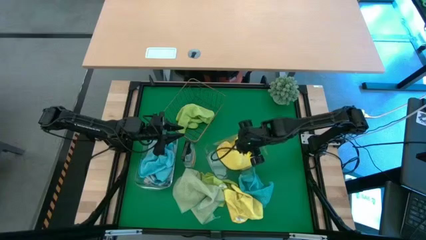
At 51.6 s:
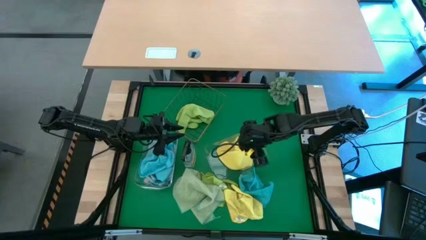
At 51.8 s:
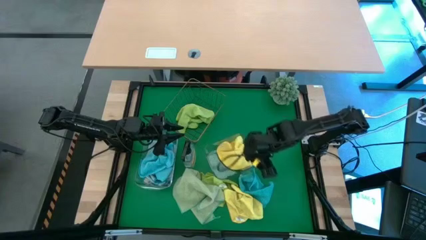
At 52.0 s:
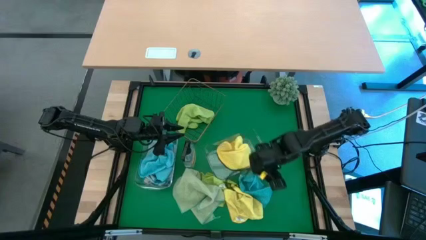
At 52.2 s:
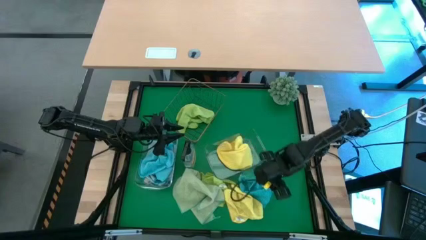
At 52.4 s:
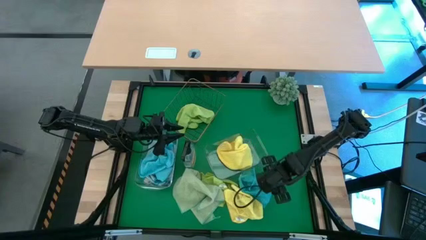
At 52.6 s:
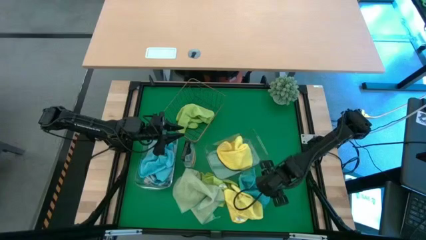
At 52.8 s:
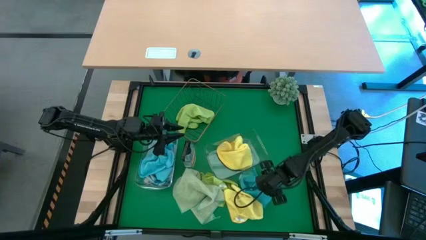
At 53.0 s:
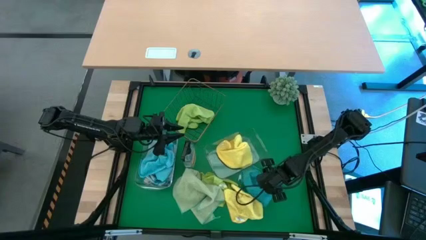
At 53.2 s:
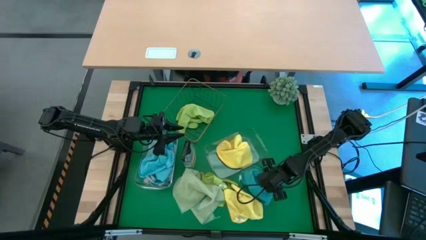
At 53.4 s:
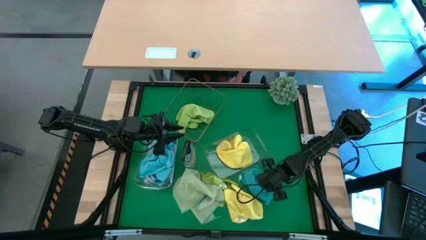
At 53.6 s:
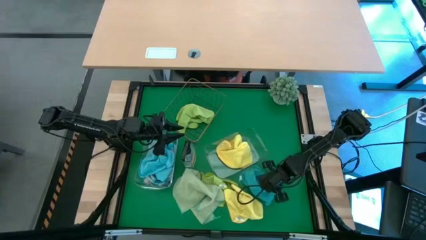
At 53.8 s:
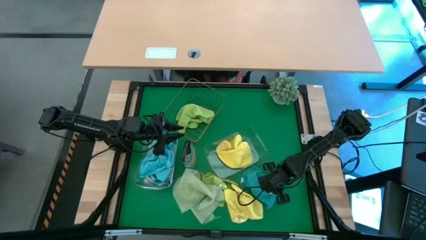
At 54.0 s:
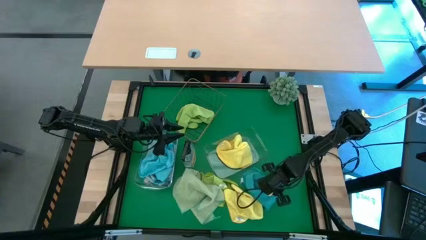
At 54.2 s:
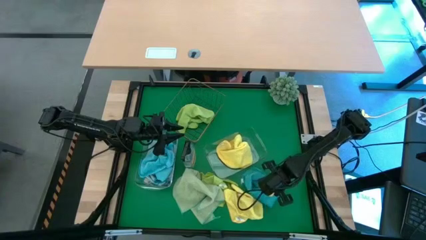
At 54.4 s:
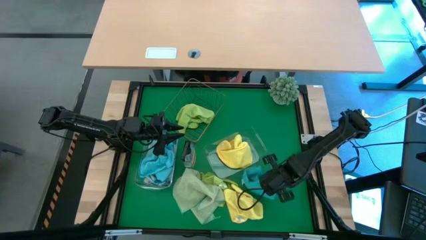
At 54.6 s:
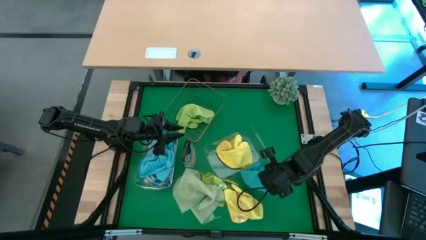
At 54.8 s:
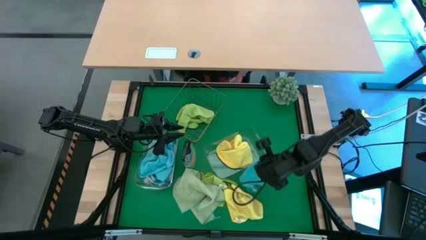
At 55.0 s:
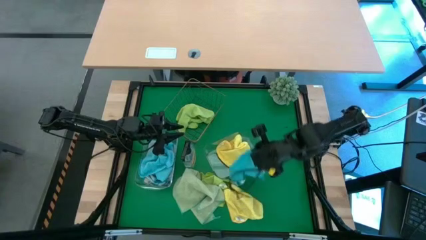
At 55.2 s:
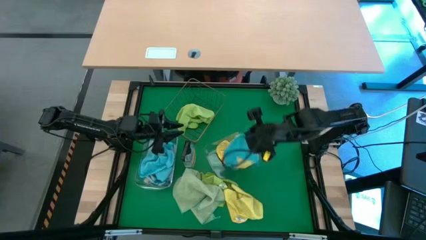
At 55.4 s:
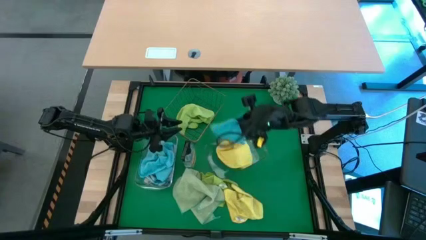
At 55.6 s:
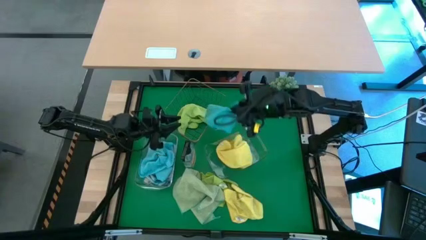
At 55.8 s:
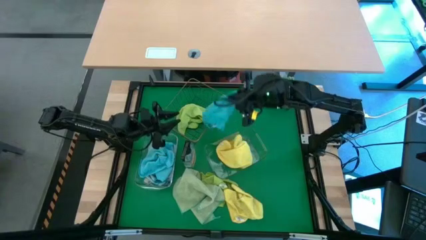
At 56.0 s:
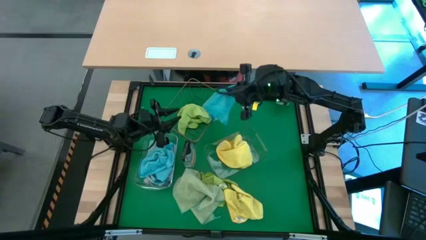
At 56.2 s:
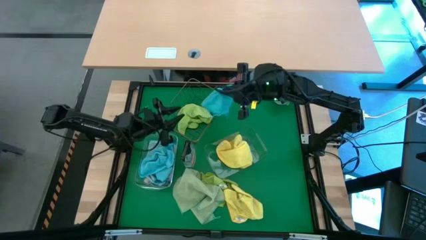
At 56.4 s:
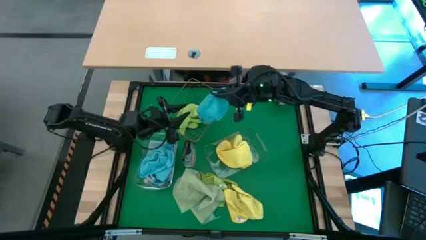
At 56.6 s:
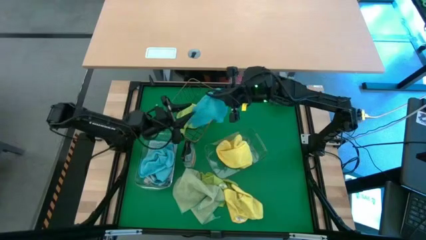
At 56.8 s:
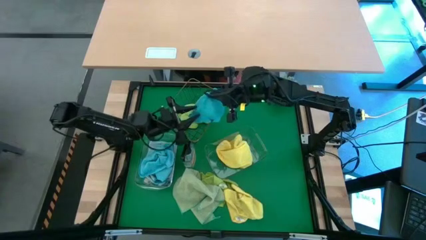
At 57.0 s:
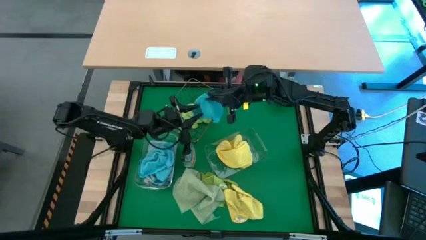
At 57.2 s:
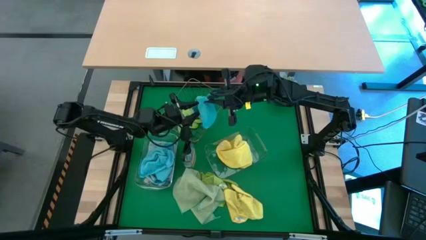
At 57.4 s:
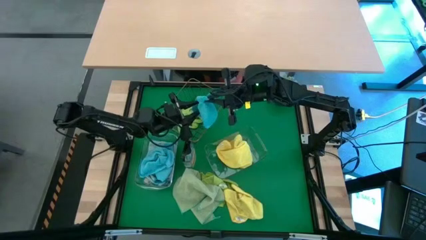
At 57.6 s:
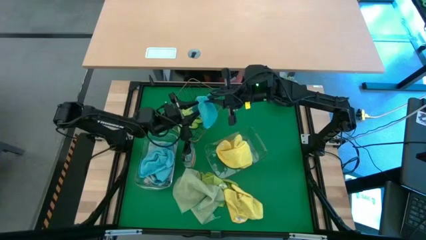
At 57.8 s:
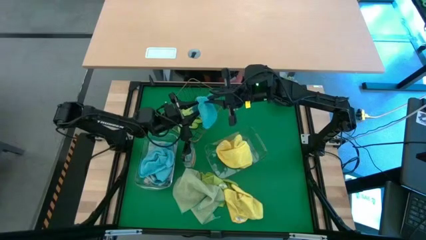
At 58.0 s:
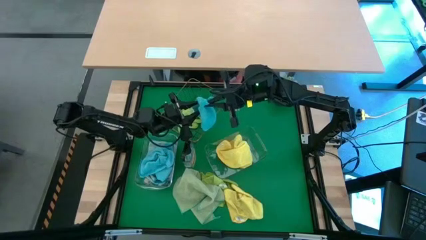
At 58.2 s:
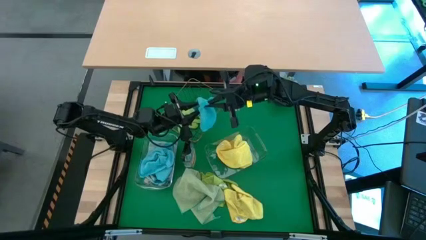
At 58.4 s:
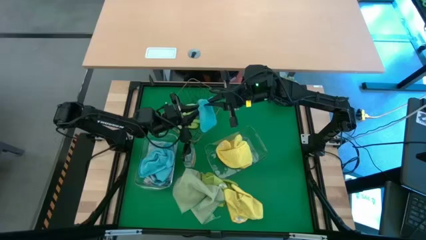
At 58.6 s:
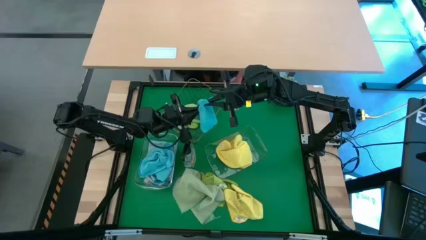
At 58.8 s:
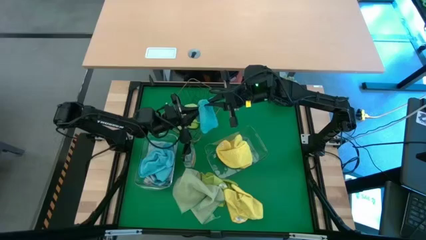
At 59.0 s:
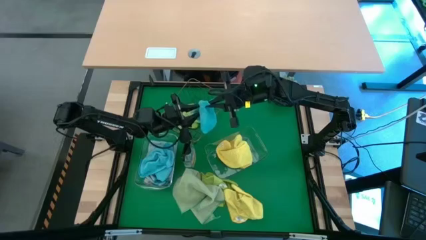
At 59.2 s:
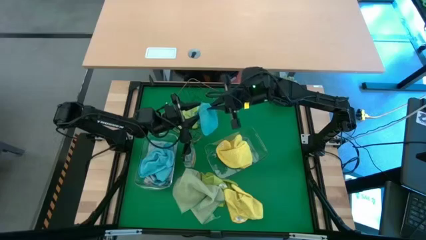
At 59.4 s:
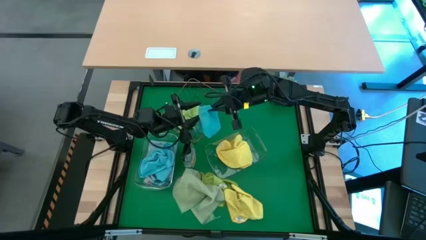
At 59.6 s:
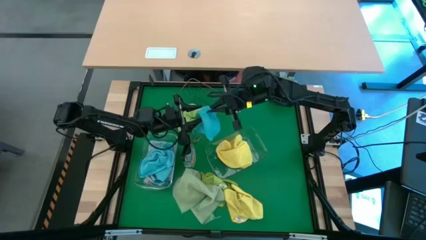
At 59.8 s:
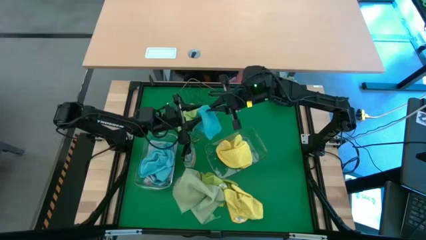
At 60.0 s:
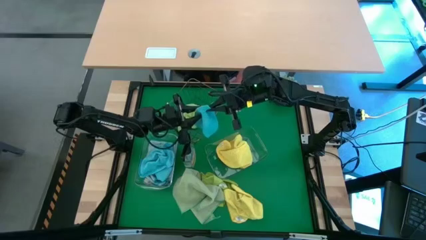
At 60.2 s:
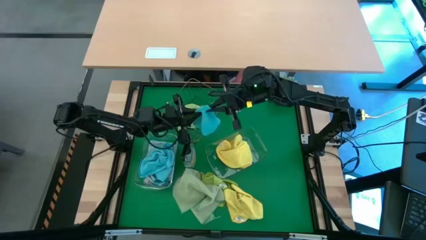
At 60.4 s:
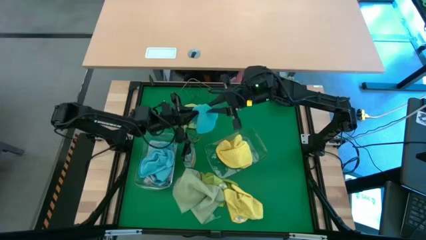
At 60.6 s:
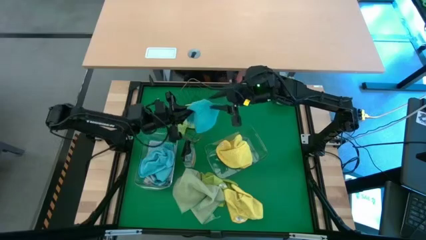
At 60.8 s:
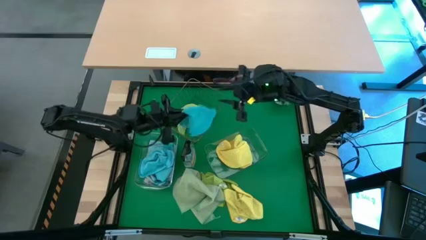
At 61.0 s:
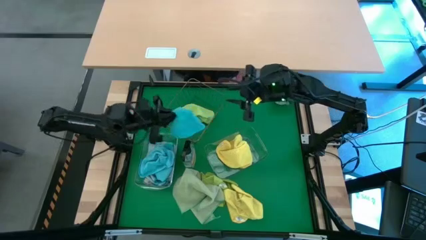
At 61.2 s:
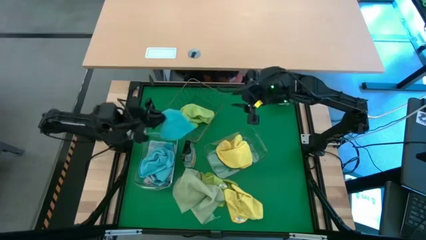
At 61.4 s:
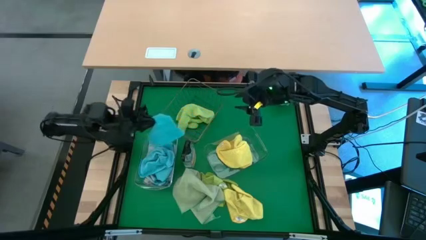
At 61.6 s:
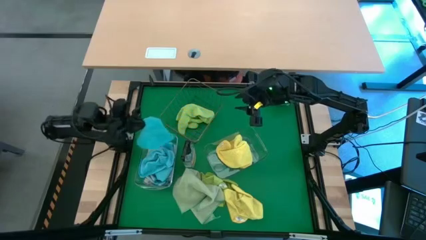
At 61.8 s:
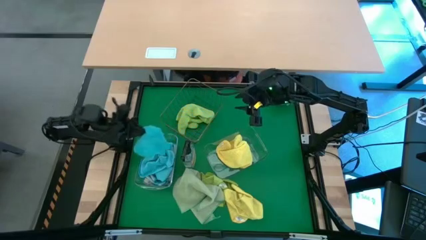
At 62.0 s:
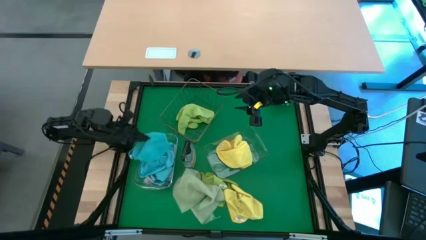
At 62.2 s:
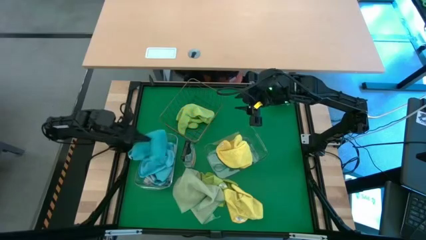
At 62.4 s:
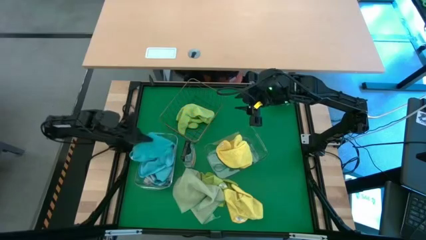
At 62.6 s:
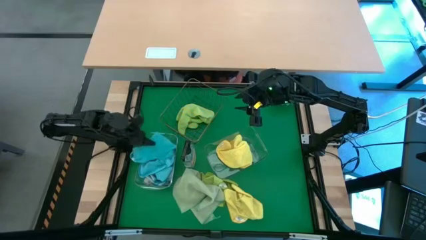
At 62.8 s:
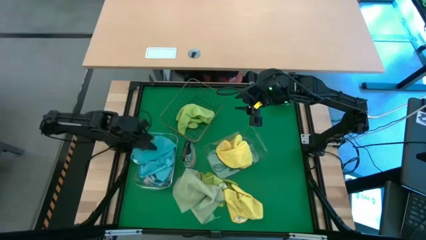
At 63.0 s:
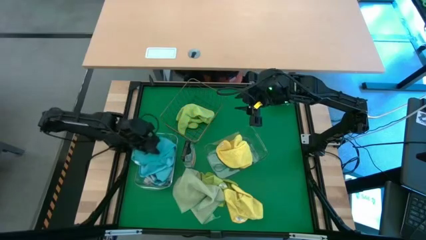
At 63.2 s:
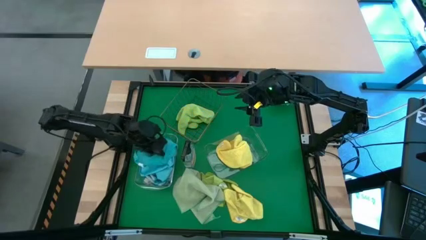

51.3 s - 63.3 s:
Task: Sort microfiber towel by color & place in baskets
Put the blue microfiber towel into the left transparent bin

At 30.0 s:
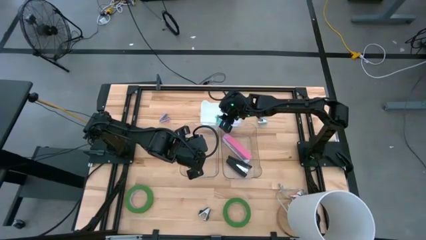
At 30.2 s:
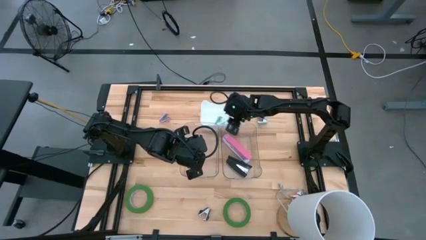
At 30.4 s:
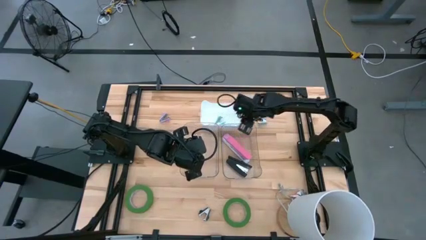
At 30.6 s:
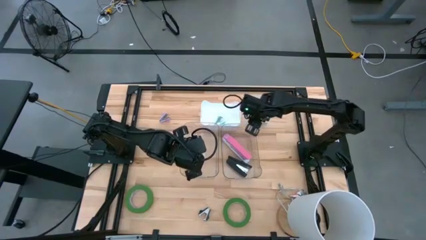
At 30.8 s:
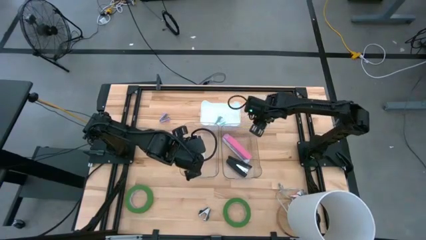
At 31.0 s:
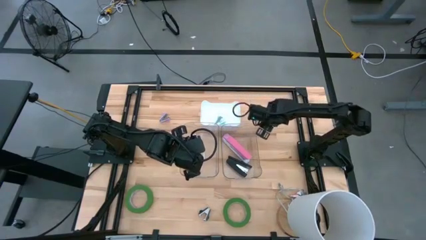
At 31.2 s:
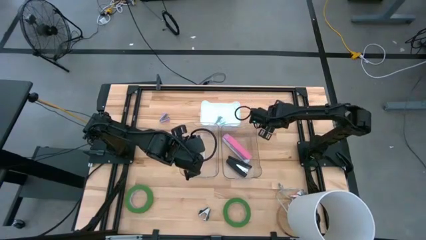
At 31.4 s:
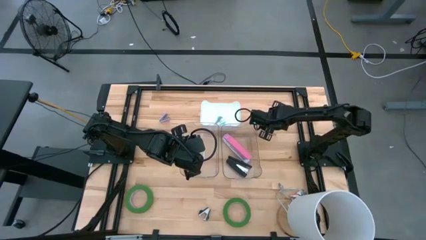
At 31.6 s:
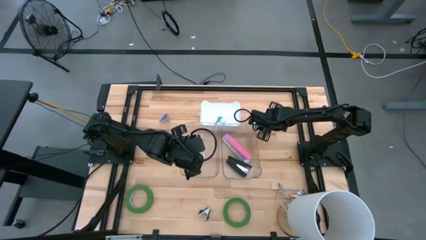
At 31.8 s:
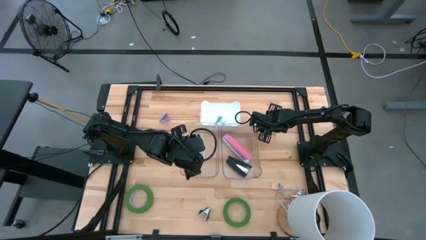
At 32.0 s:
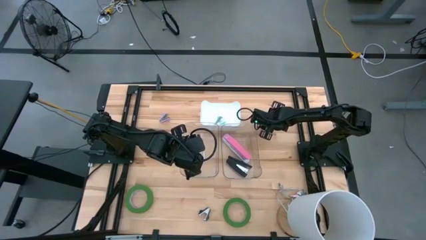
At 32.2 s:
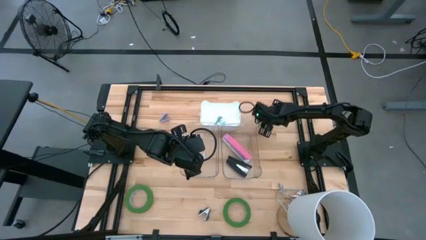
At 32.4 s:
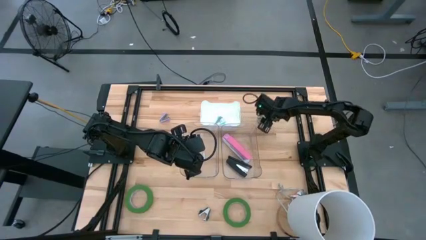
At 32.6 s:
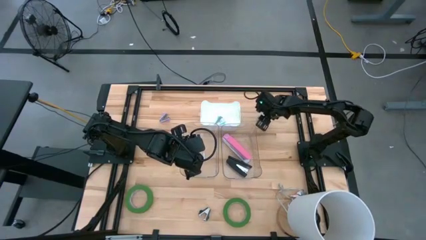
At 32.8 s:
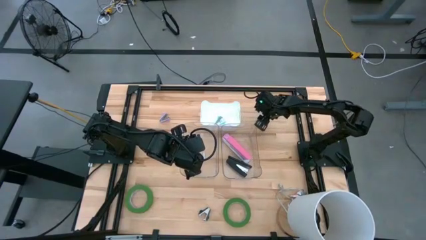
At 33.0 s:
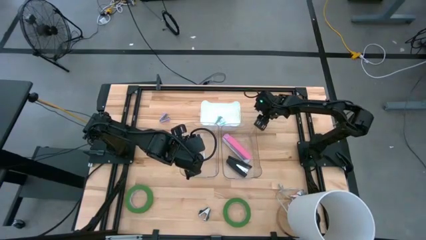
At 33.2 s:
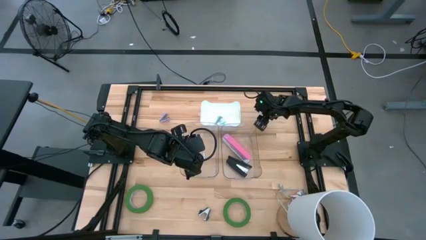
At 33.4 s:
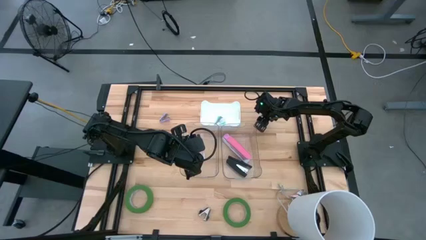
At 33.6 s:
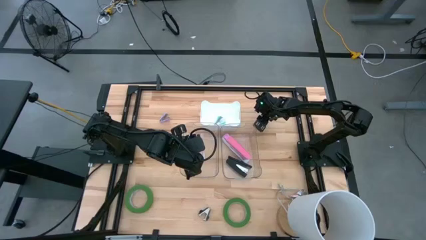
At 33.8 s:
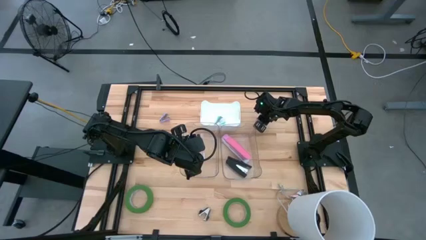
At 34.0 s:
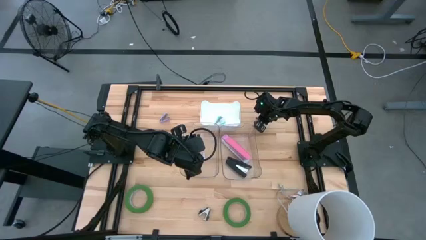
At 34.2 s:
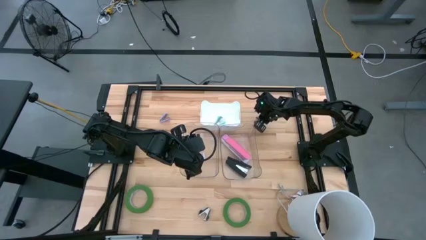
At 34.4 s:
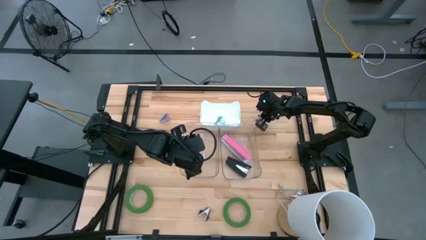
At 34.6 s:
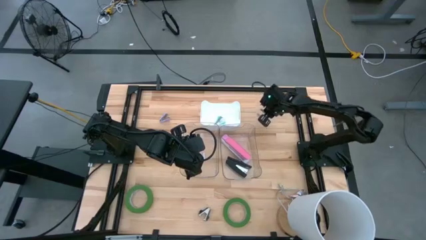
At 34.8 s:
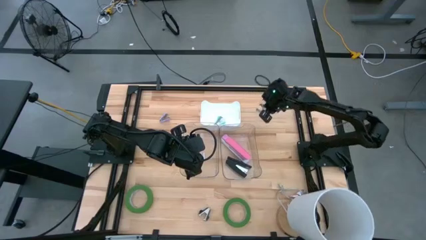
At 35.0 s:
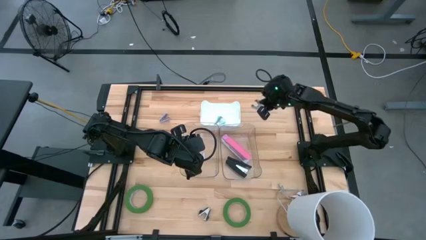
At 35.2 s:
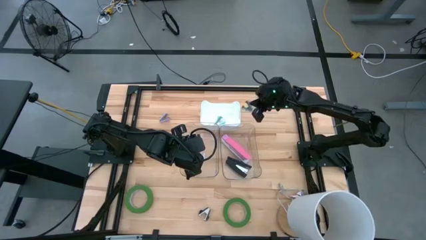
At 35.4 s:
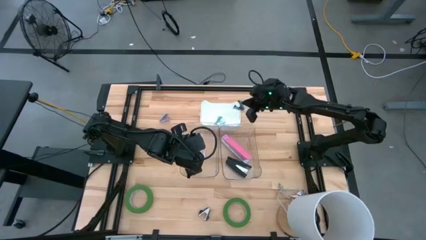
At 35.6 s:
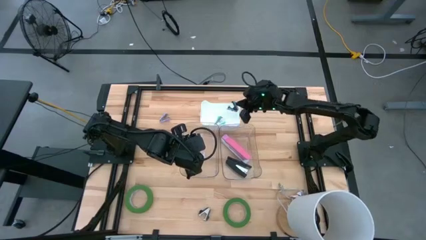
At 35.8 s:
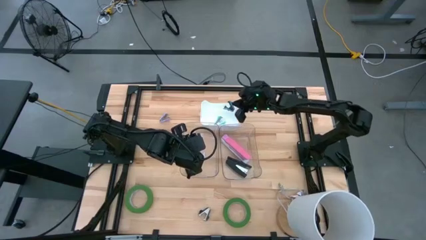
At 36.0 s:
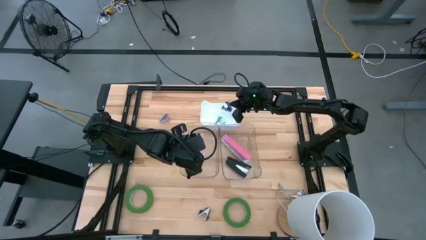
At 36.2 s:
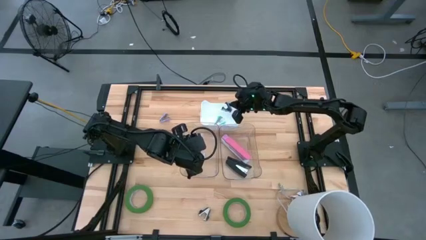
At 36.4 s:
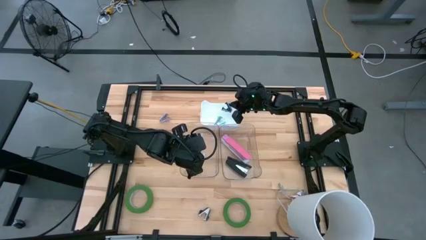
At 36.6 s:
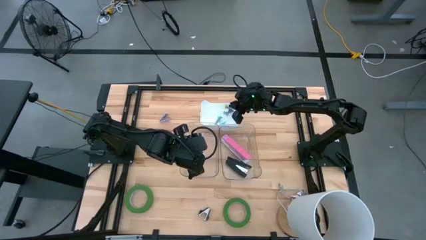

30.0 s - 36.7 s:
Task: Pick and place Stapler, Stapler remover, tape
Put the blue staple remover into the white bin
